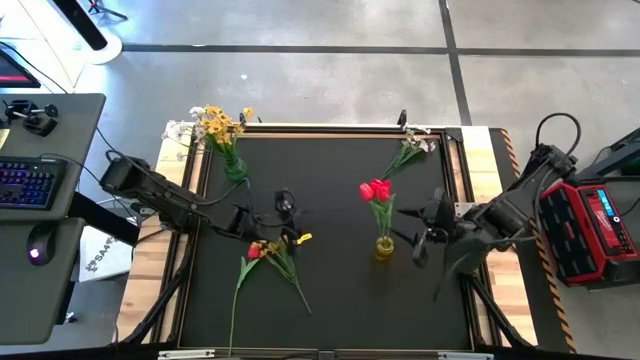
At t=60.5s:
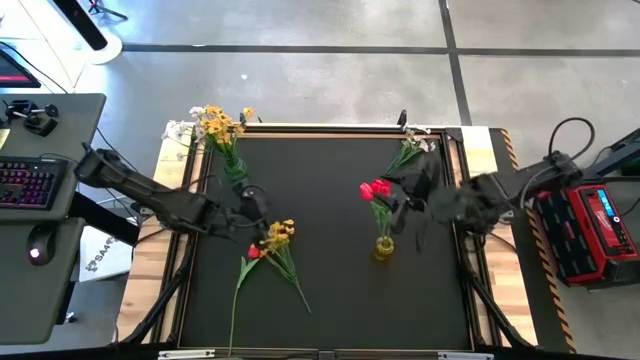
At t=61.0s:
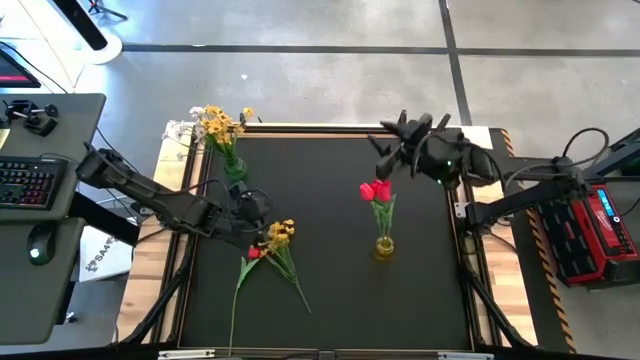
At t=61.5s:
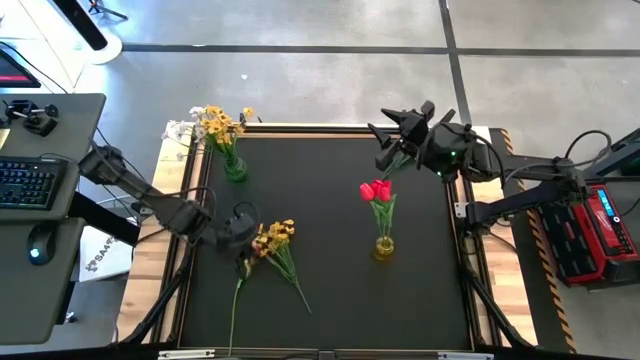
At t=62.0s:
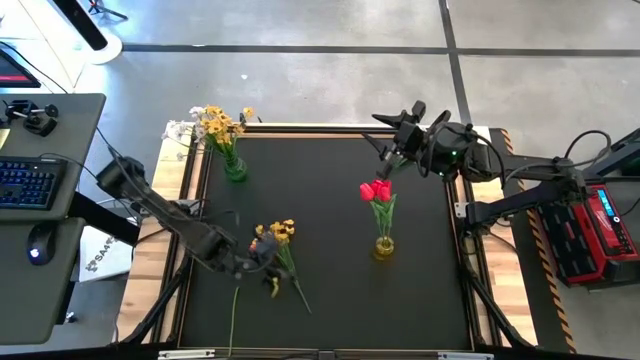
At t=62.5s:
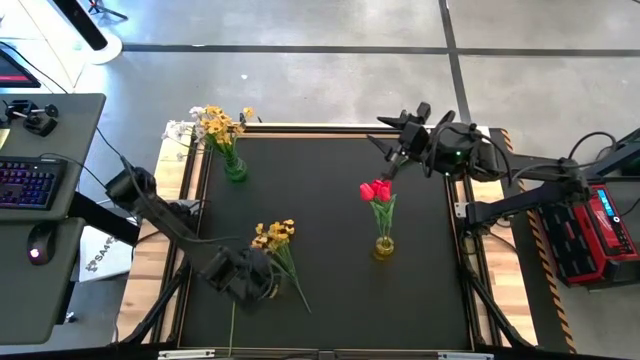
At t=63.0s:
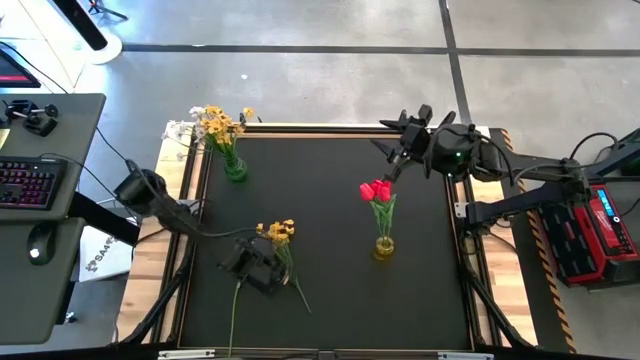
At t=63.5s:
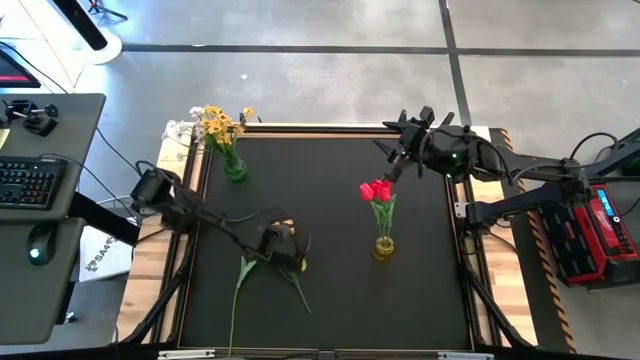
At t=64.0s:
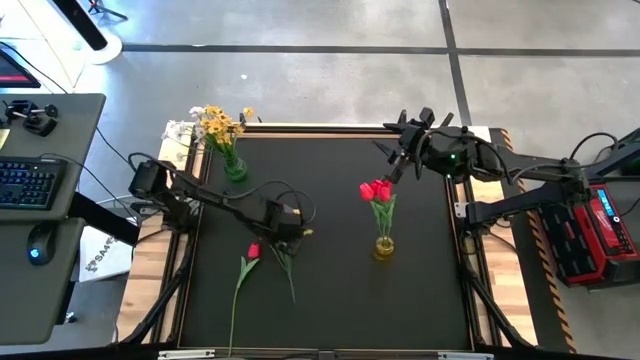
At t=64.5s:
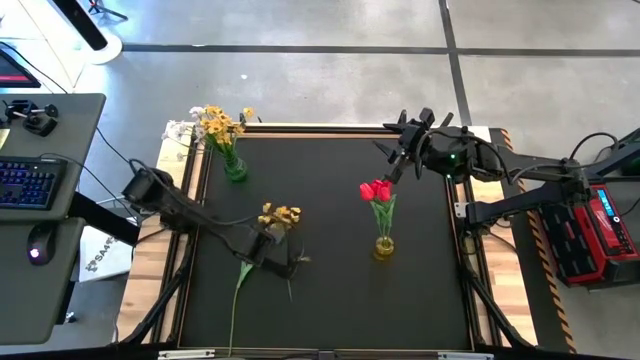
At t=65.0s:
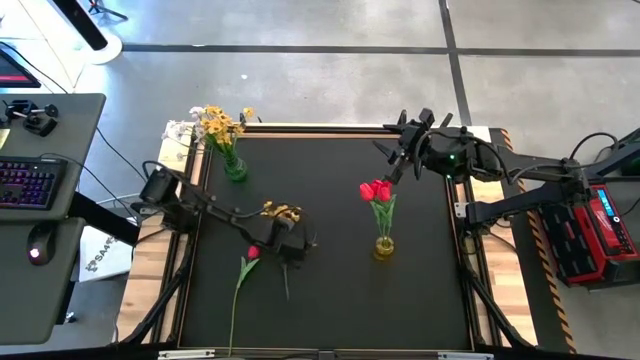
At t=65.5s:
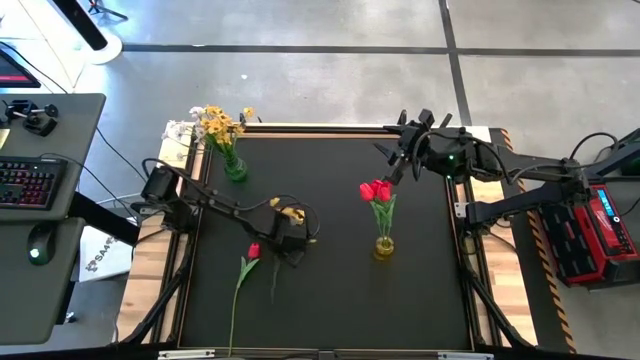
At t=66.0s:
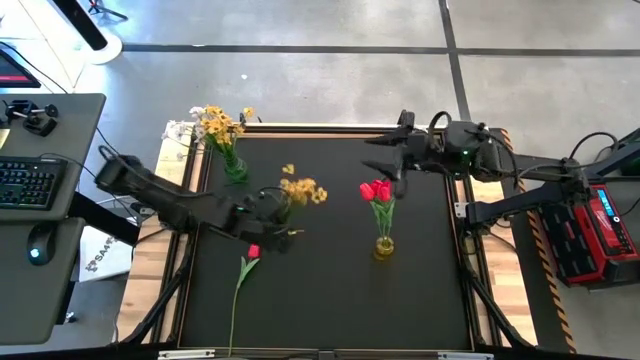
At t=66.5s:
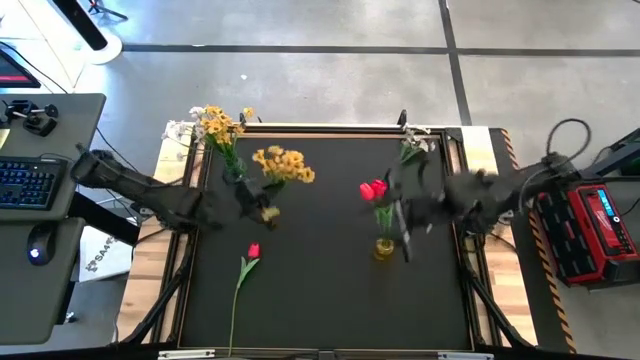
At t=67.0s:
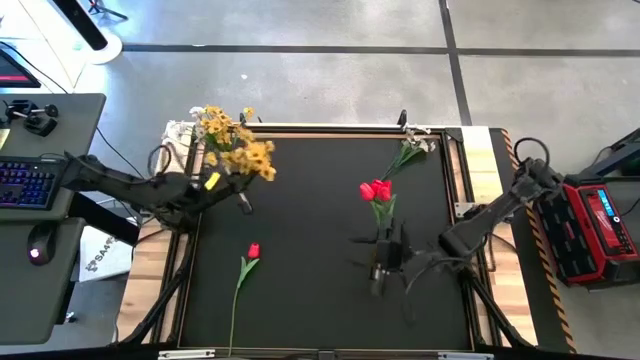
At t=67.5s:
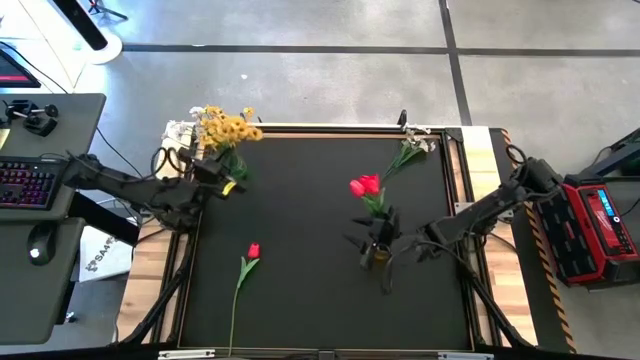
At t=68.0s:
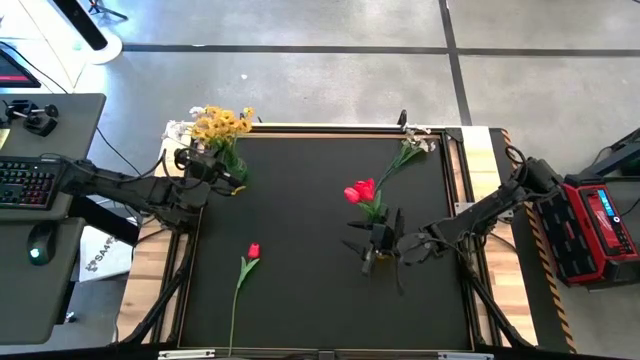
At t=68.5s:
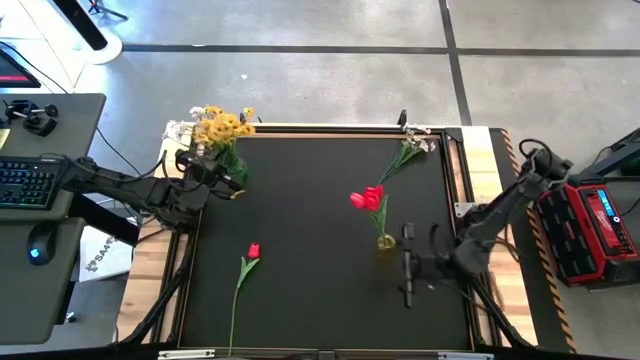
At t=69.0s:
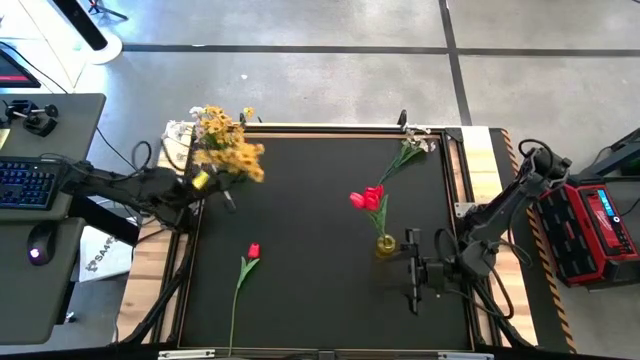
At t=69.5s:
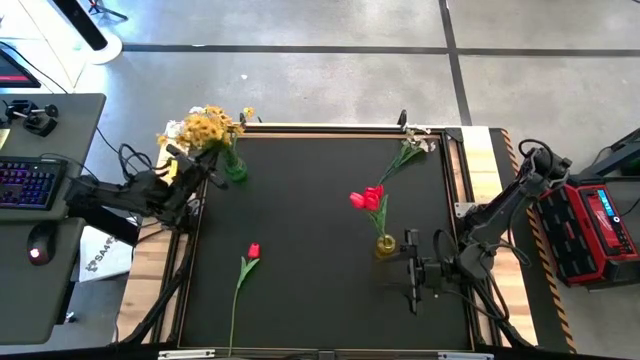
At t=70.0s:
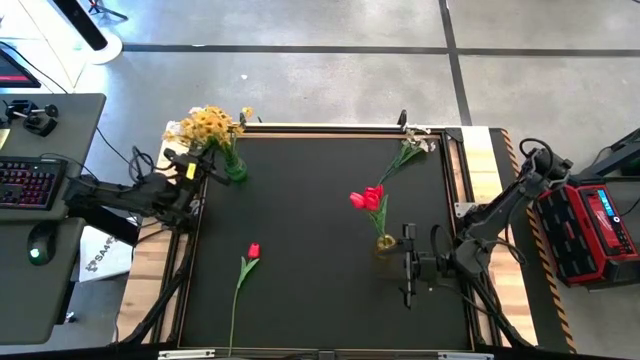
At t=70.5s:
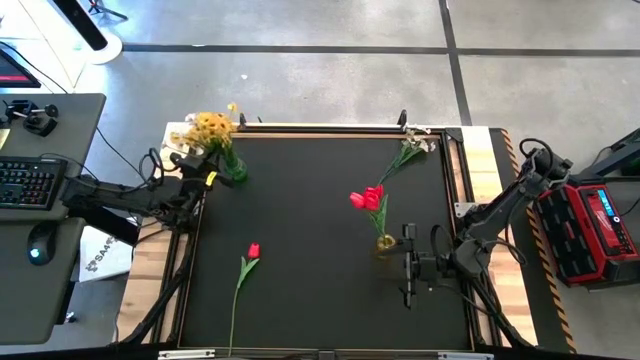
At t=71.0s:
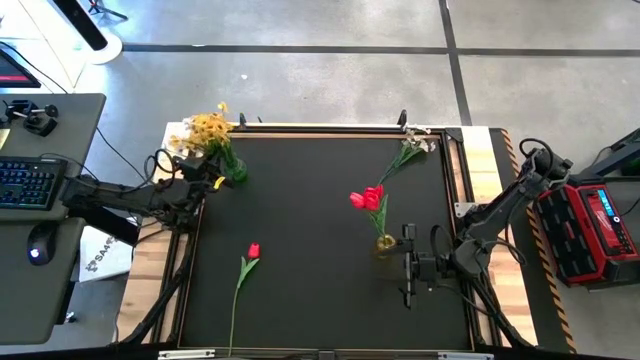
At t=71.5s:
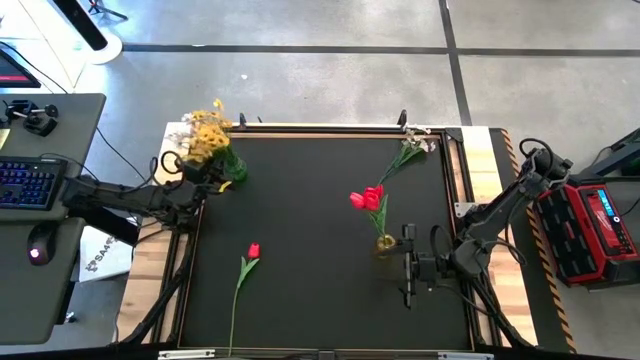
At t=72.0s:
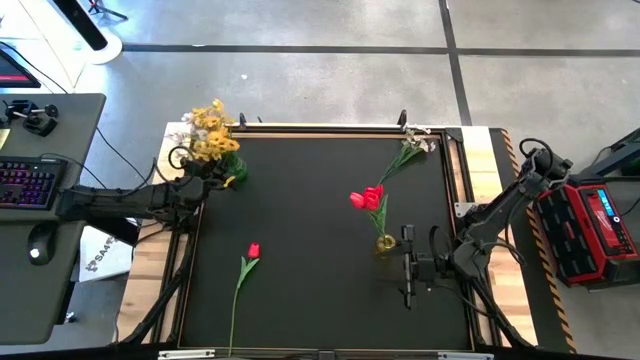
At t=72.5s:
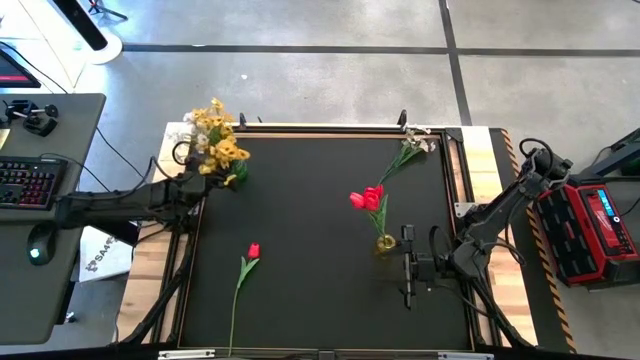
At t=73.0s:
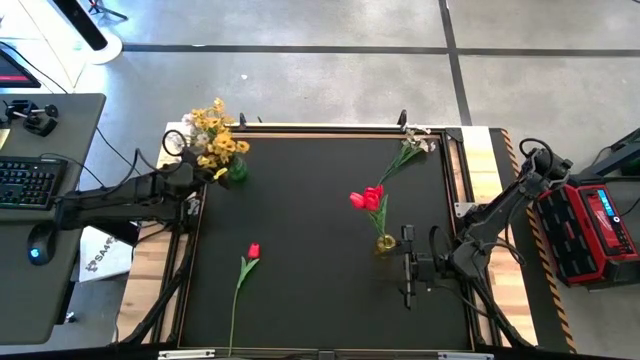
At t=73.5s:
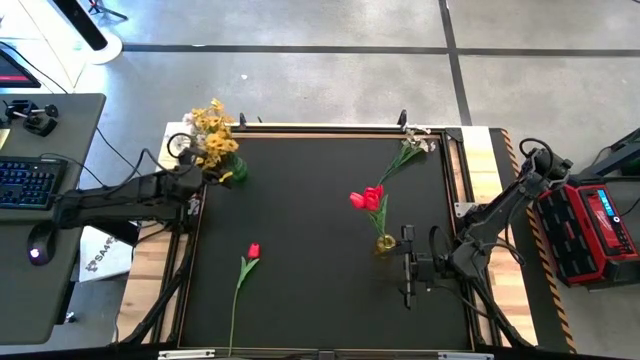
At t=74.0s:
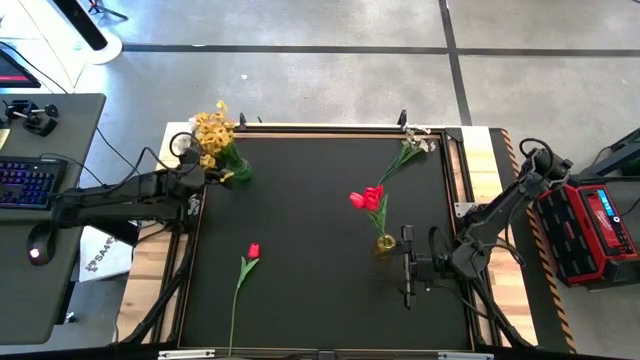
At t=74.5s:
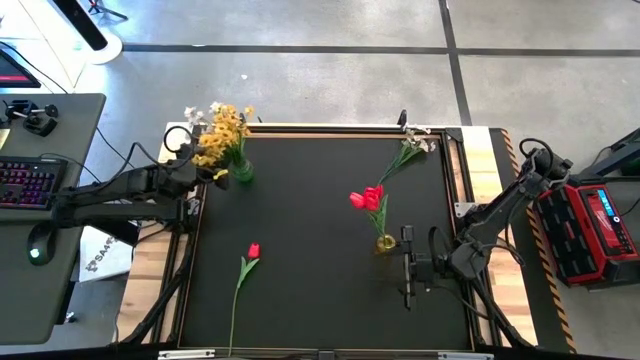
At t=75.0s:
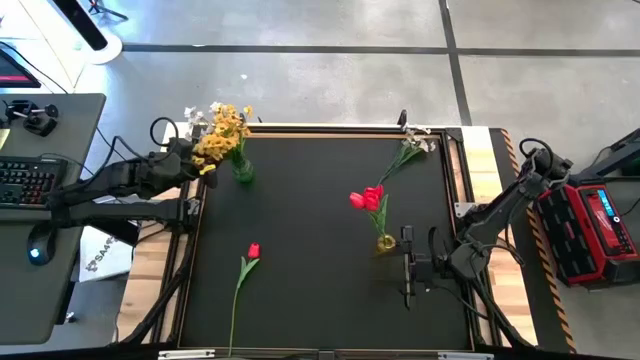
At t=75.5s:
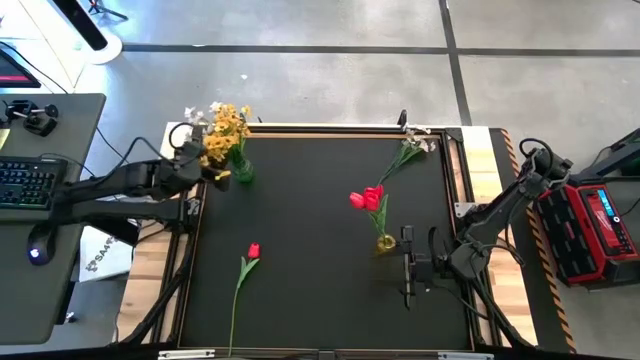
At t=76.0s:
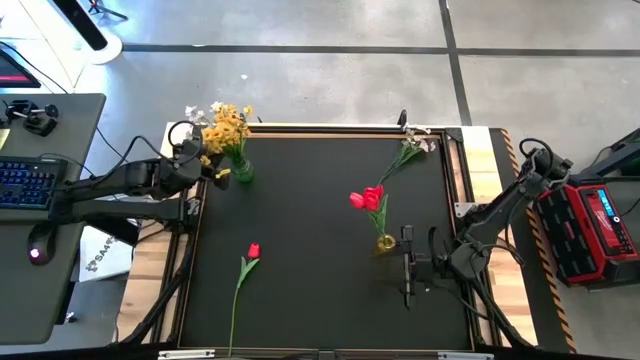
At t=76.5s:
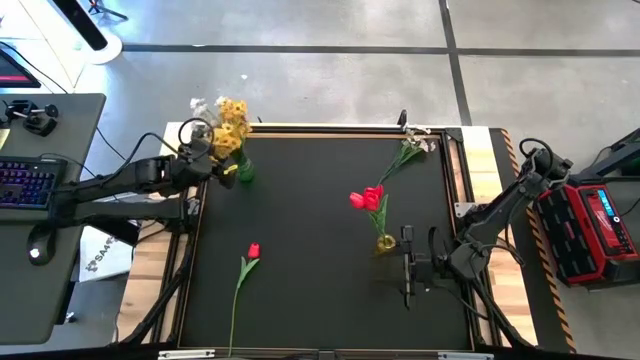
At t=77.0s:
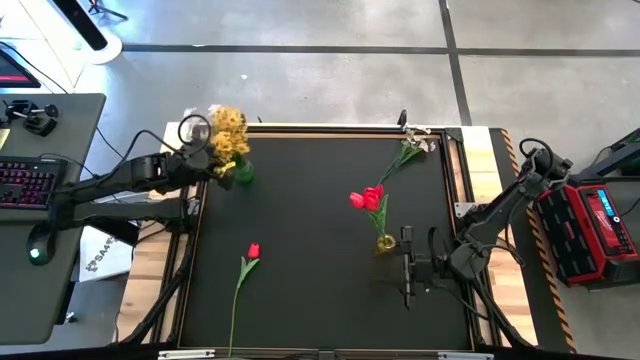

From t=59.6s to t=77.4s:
Task: Sort flowers into vase by color
Put the yellow clustered flowers into the green flower vase

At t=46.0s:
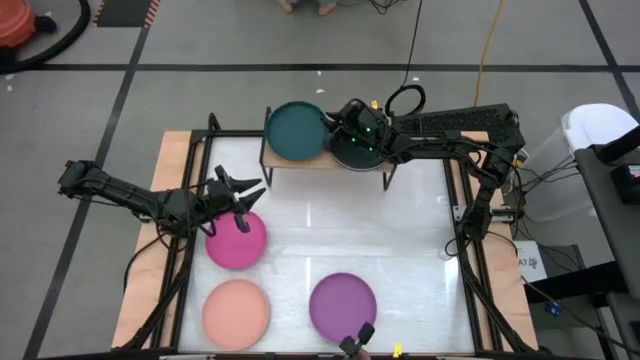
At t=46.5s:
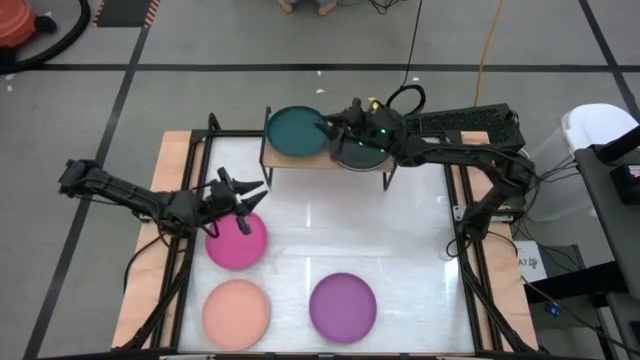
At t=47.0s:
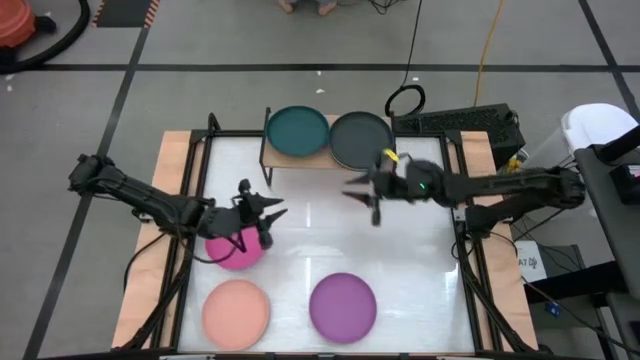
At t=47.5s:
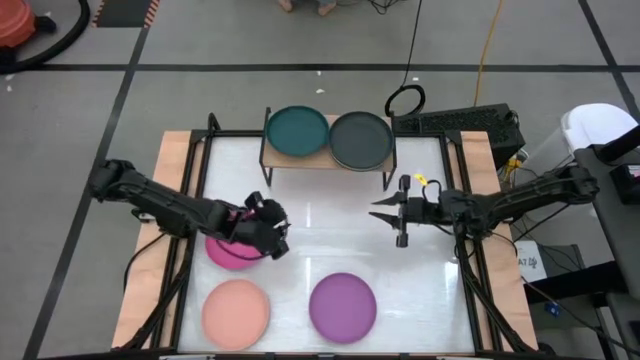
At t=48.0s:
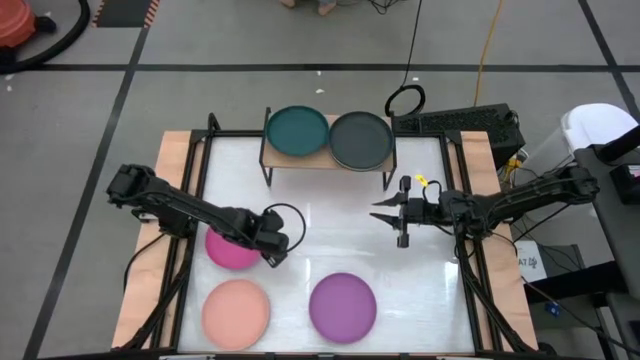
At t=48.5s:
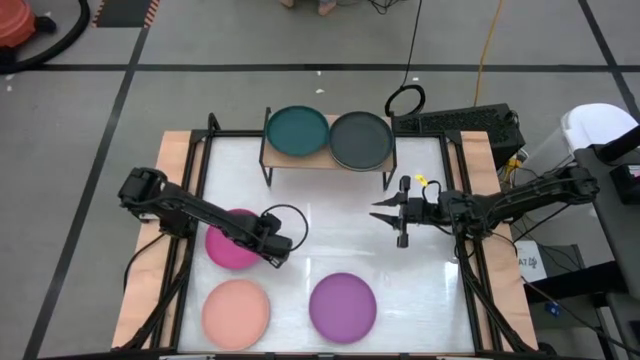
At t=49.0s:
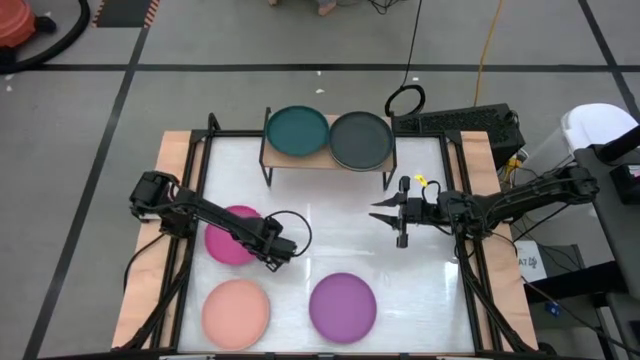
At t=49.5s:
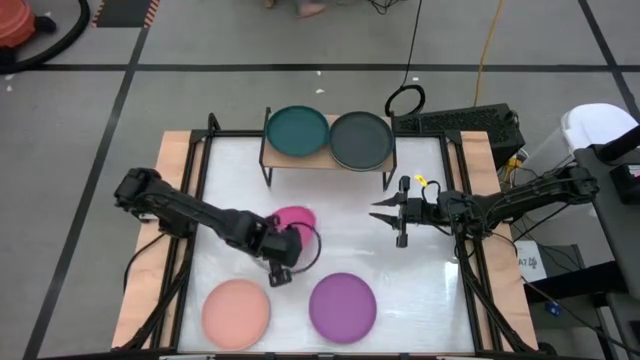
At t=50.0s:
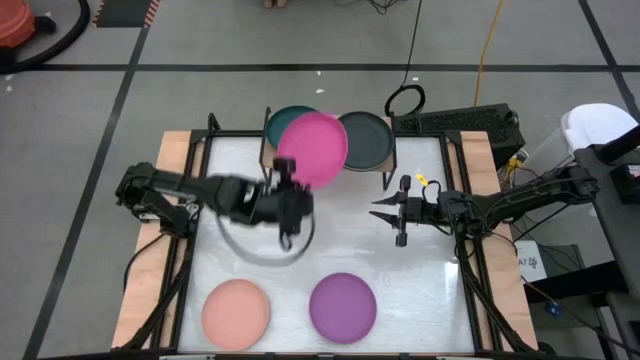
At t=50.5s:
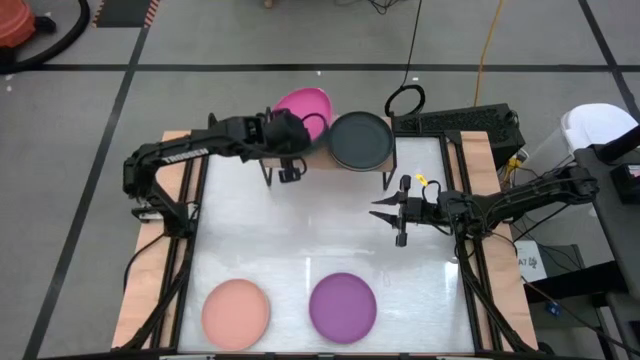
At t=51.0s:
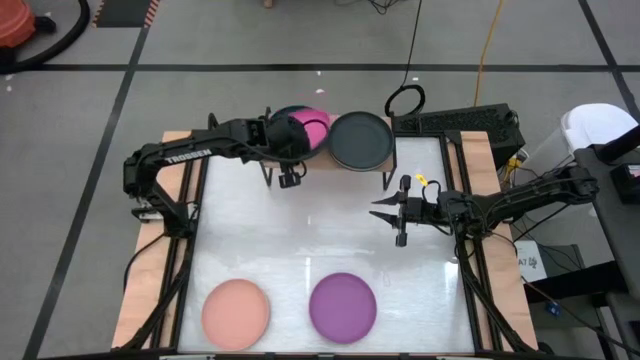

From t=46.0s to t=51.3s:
Task: Place and stack plates onto a shelf
Stack the pink plate on top of the green plate on the shelf
